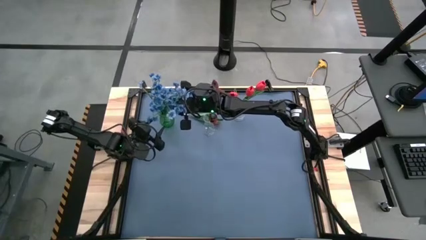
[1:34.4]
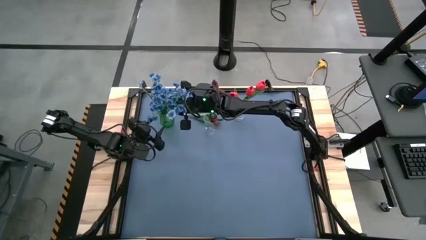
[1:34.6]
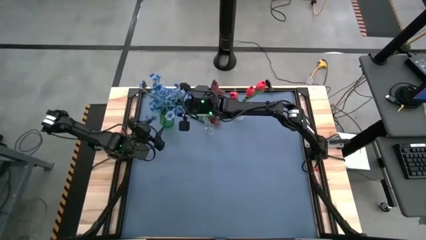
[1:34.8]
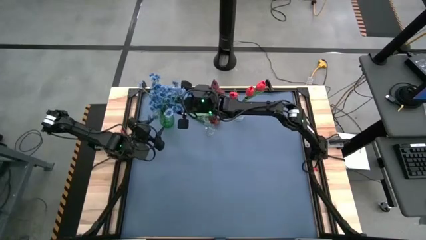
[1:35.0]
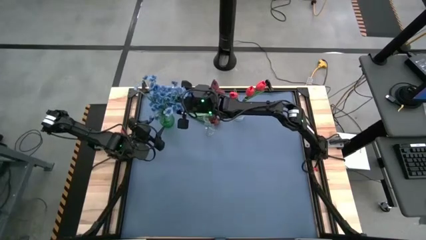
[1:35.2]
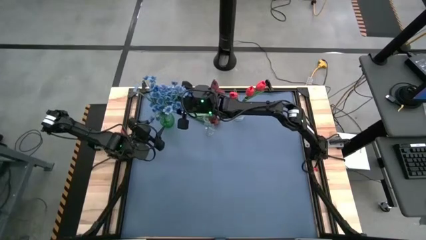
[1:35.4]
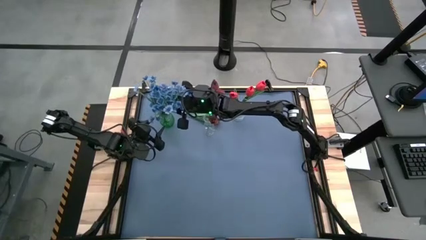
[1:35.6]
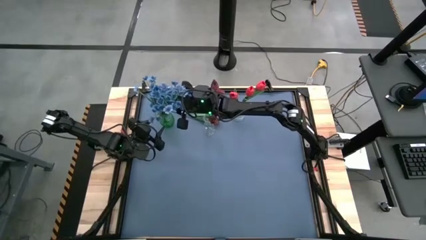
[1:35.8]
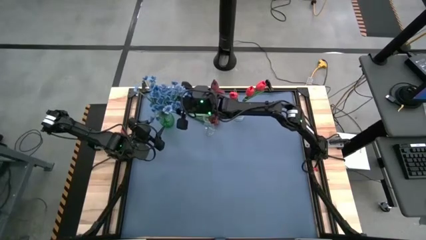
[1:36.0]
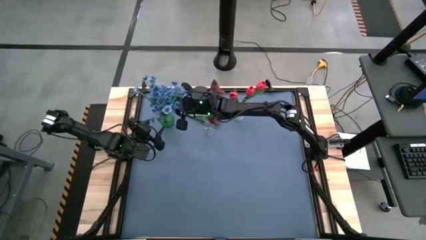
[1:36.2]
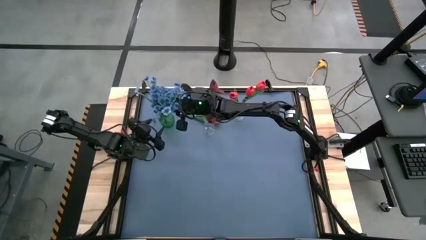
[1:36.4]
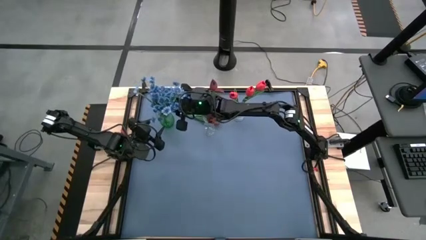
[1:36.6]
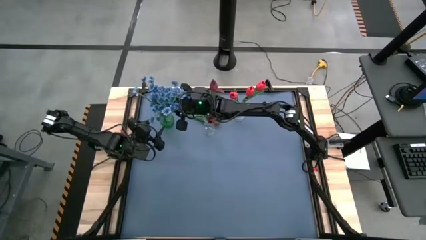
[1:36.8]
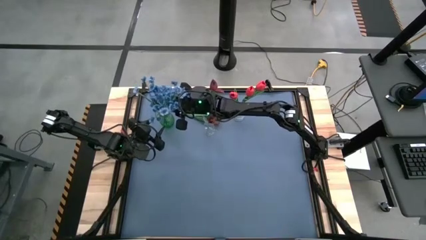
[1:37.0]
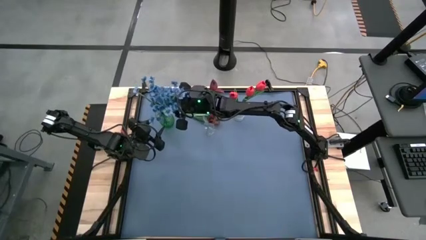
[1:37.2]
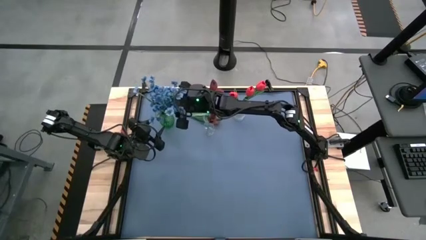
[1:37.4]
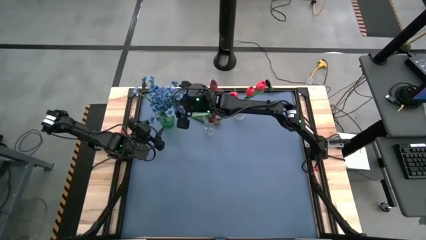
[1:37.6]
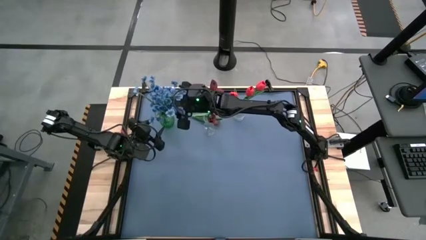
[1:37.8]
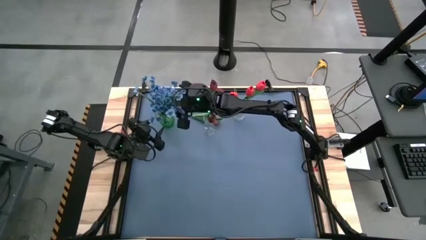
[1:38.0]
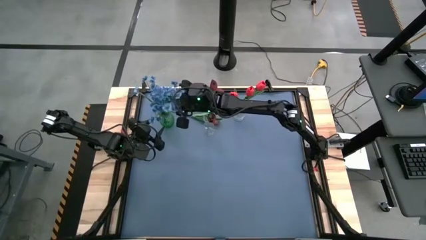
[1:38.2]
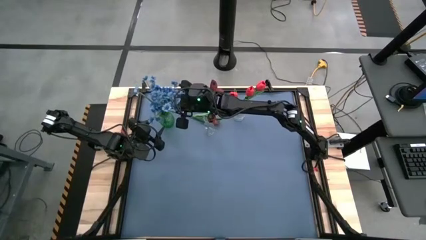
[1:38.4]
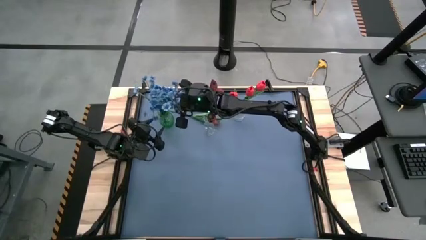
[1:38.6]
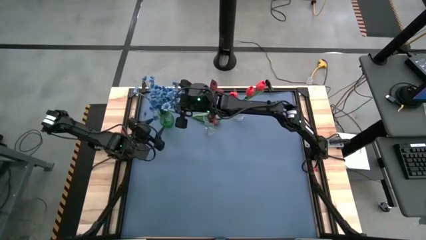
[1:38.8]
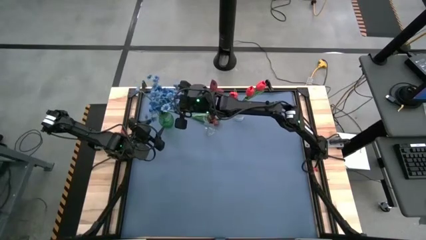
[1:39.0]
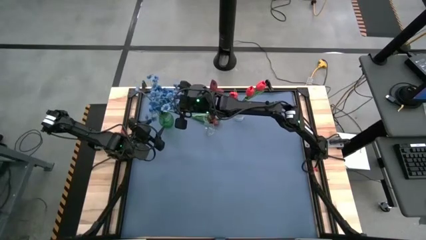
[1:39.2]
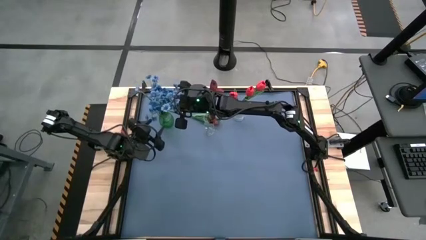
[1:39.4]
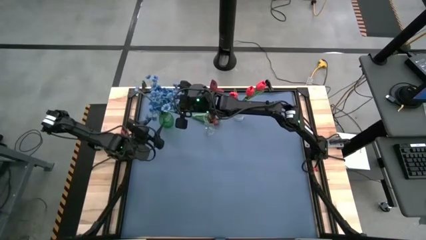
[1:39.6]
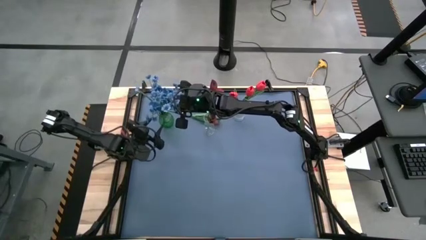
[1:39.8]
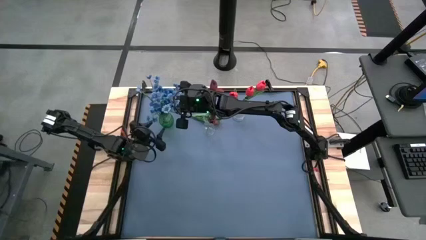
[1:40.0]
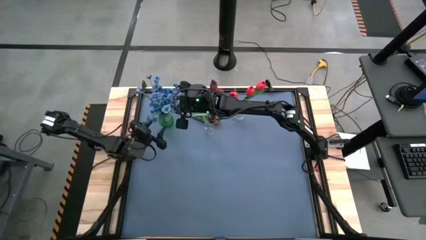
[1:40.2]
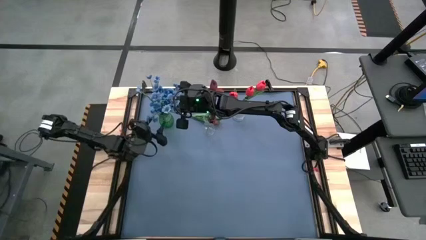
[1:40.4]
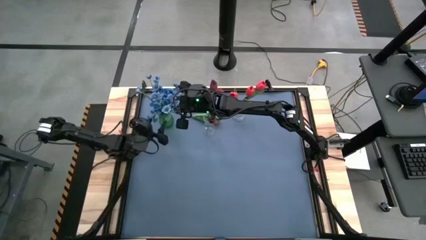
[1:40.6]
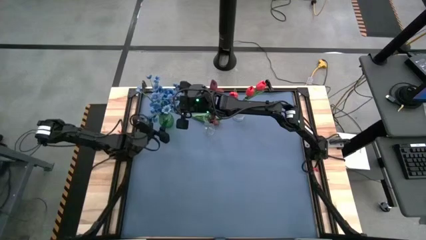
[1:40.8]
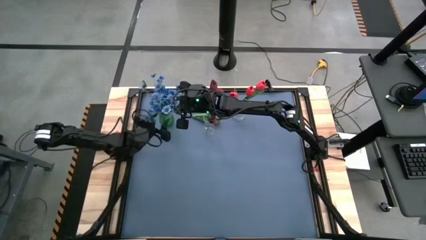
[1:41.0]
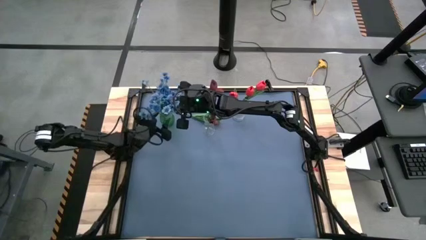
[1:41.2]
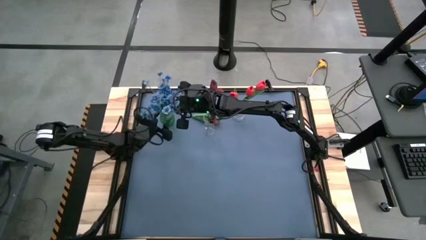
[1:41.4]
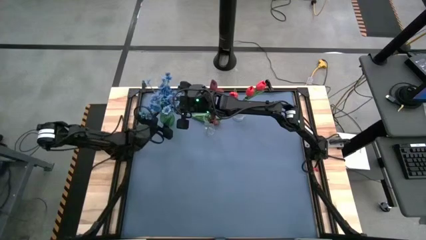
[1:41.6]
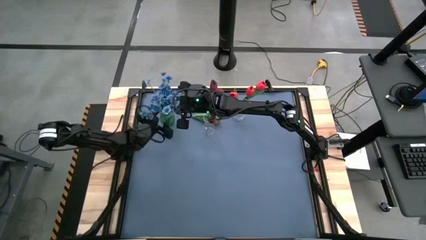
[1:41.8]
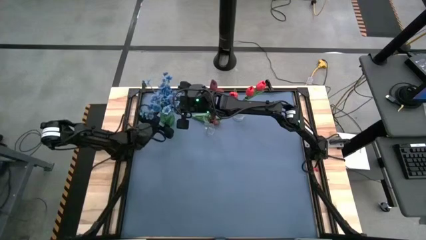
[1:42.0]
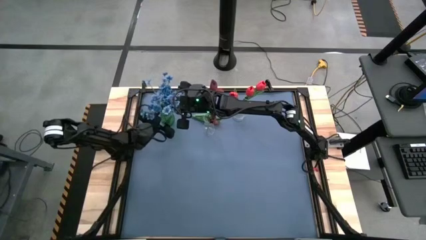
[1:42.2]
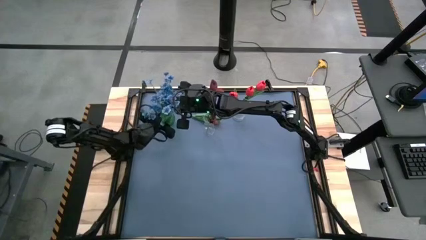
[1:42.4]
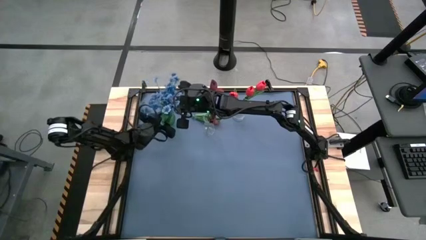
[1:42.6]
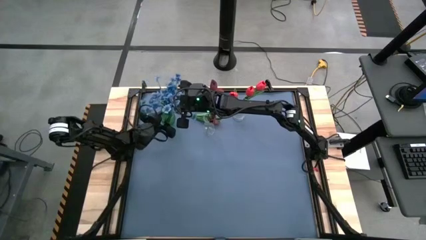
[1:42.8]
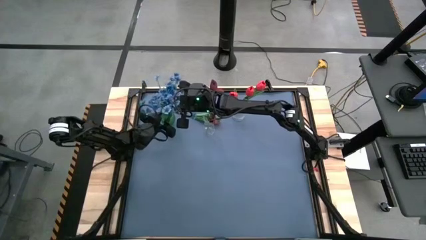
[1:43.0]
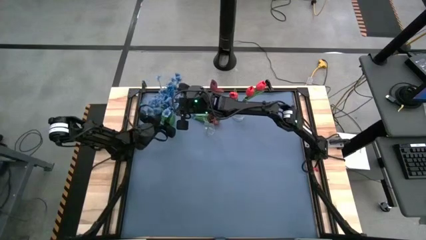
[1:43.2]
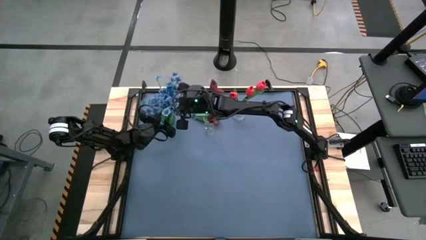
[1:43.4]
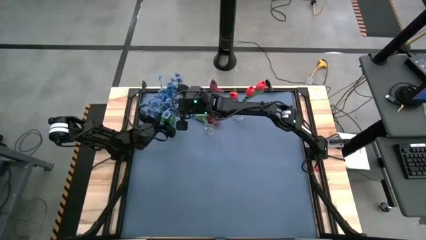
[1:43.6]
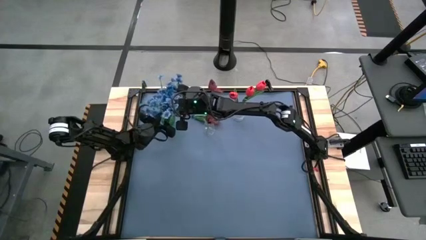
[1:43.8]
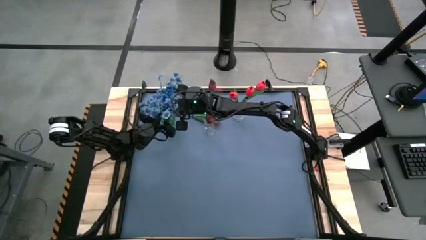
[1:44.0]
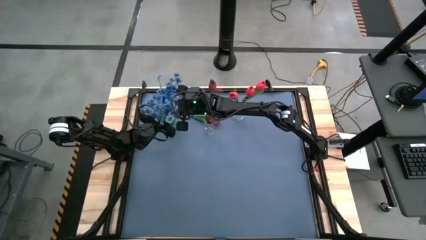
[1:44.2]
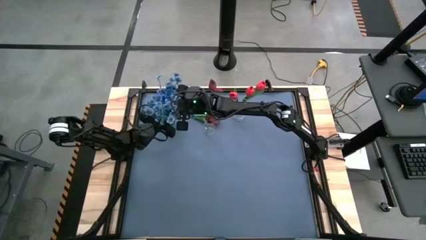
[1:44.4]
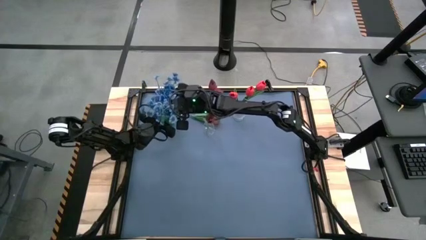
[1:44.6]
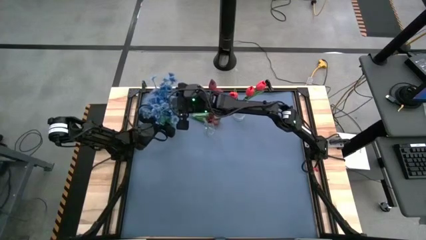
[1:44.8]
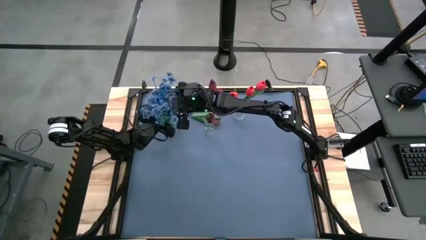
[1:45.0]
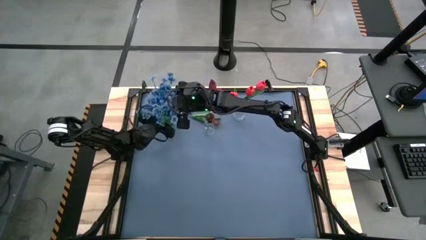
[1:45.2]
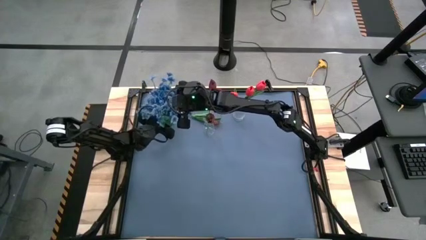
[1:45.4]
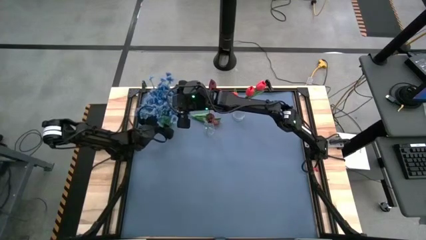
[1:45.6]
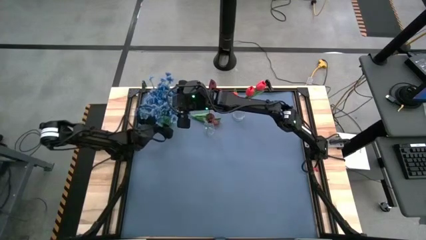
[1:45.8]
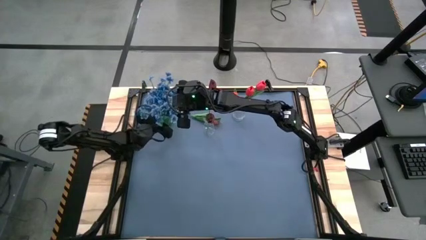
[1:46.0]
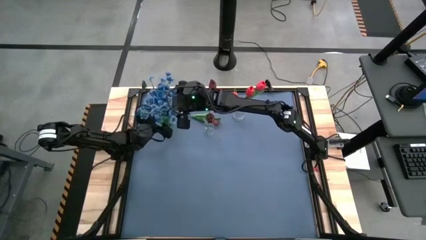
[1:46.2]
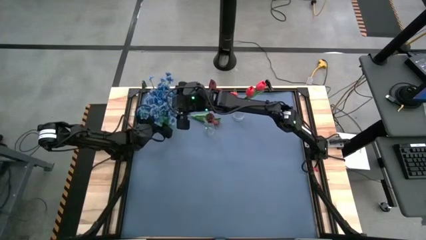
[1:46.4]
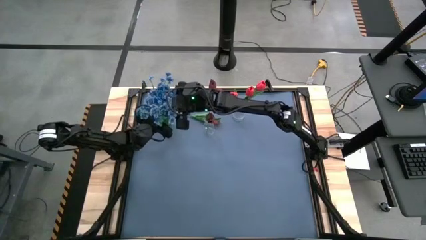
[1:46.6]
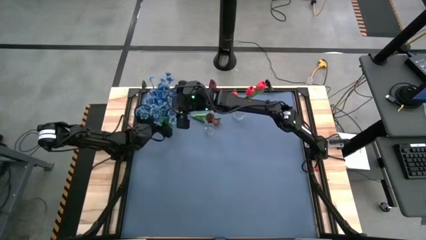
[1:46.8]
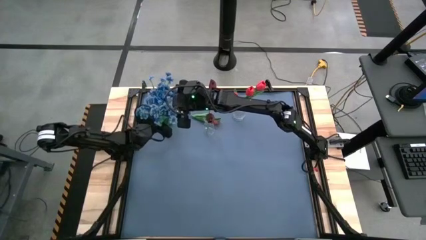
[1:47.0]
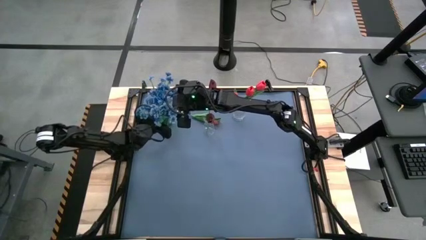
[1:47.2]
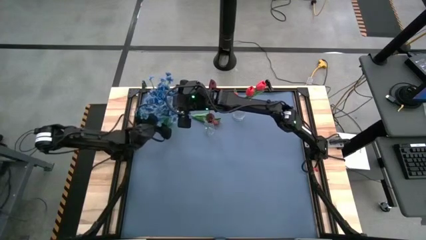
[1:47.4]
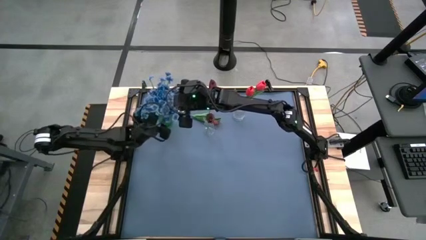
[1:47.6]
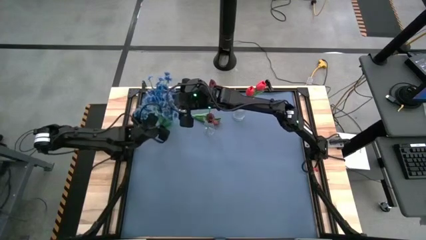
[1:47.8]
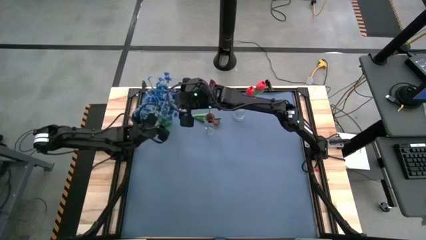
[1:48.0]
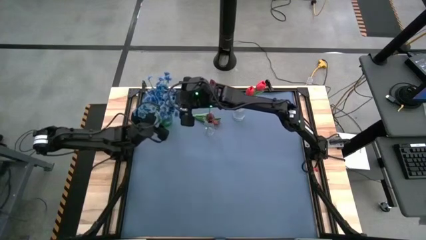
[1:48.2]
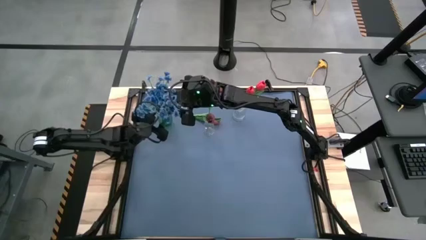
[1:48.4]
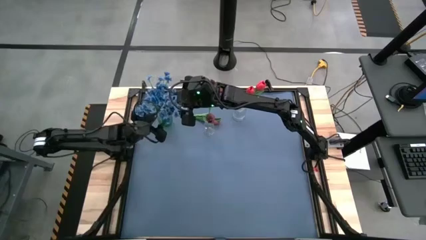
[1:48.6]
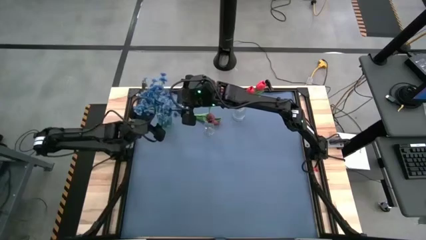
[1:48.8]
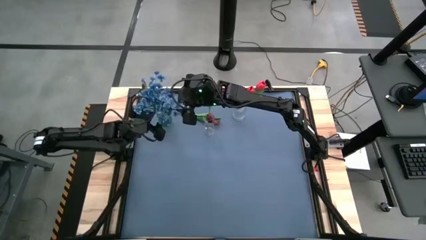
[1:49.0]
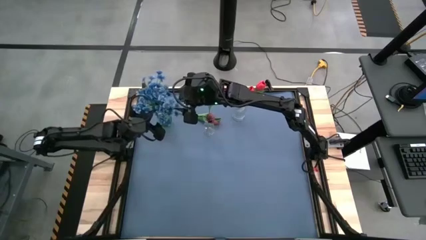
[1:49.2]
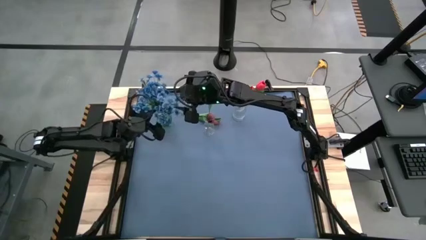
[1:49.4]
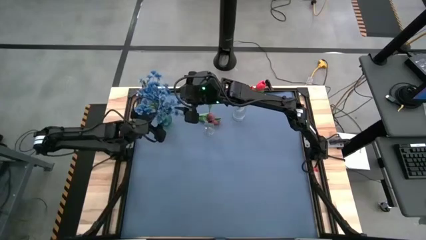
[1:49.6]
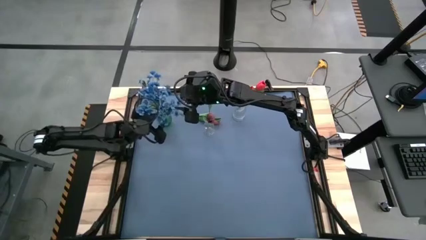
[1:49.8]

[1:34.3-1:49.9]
Task: Sort flowers into vase by color
Put the blue flowers into the green vase
